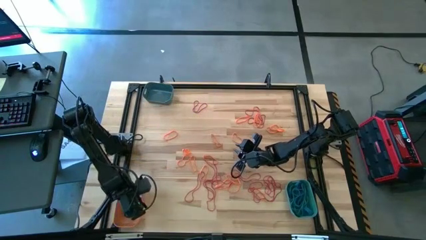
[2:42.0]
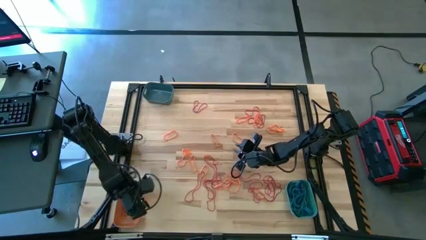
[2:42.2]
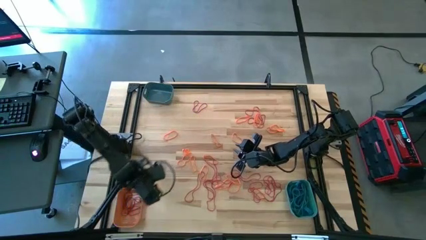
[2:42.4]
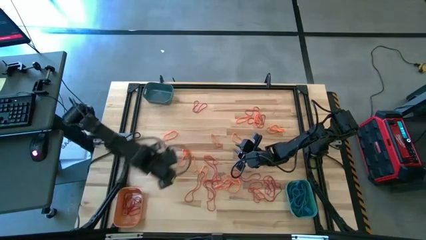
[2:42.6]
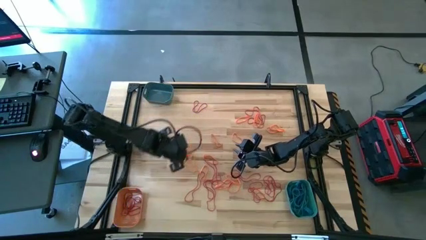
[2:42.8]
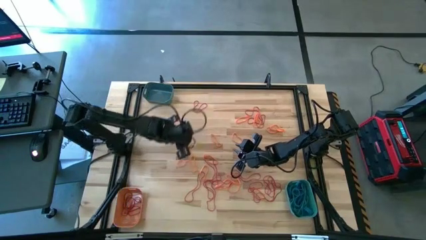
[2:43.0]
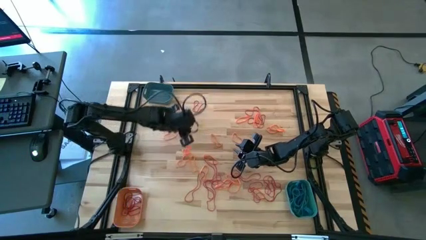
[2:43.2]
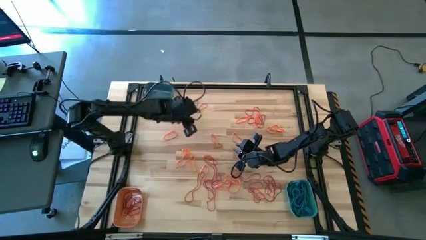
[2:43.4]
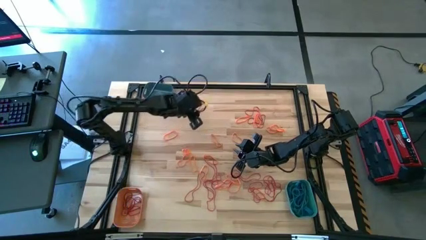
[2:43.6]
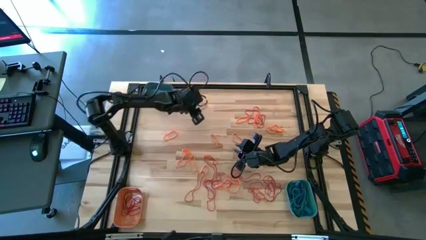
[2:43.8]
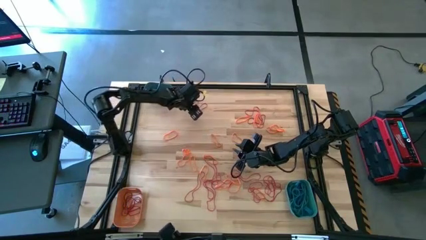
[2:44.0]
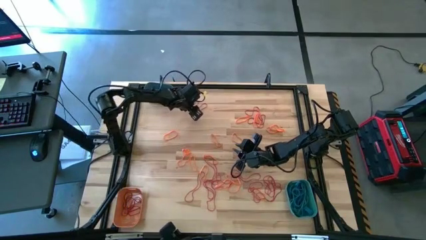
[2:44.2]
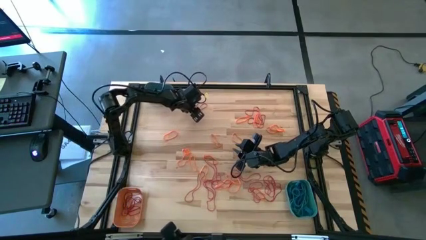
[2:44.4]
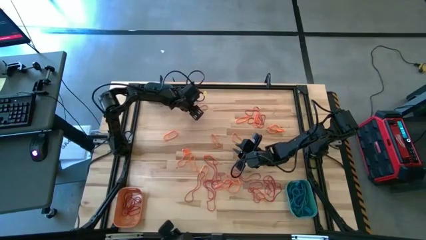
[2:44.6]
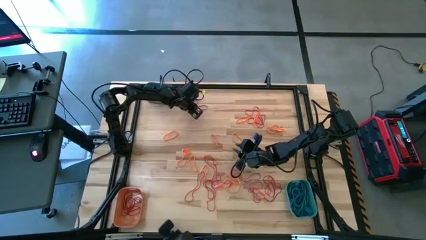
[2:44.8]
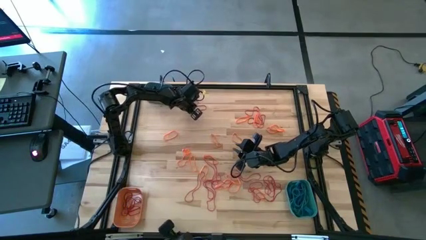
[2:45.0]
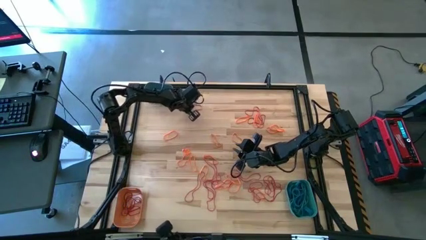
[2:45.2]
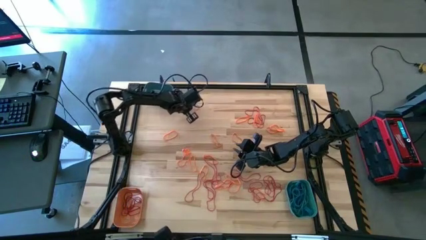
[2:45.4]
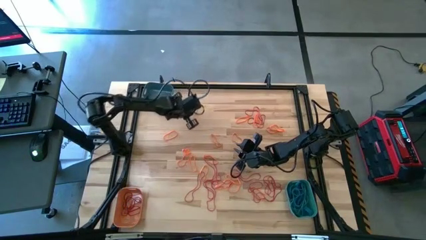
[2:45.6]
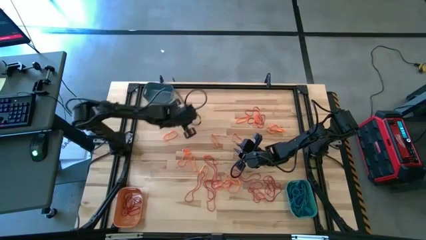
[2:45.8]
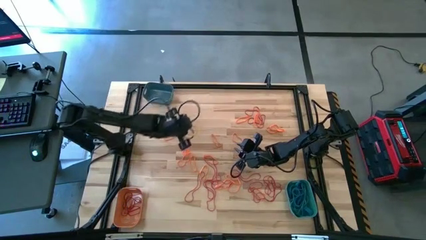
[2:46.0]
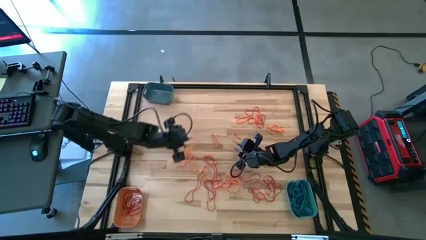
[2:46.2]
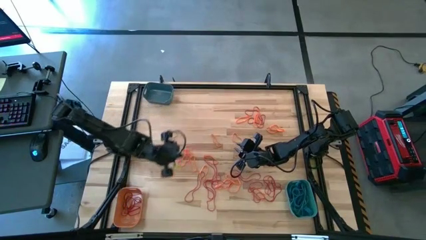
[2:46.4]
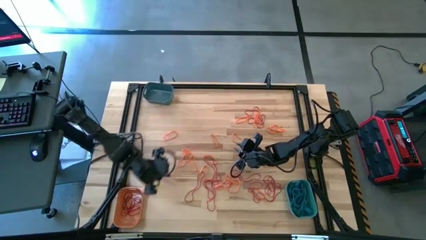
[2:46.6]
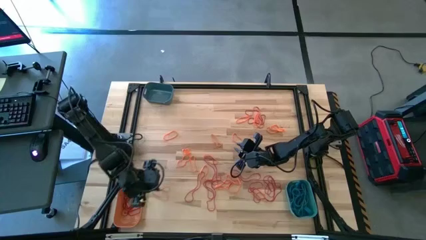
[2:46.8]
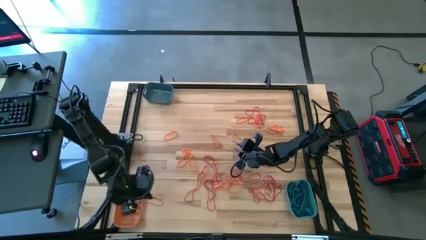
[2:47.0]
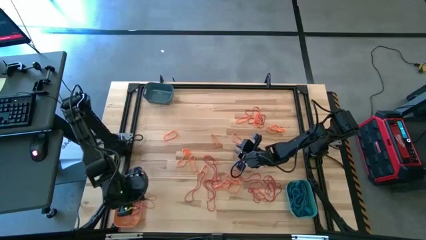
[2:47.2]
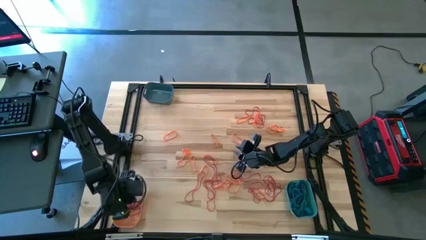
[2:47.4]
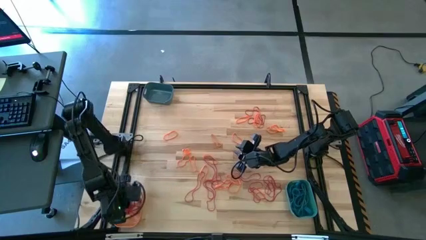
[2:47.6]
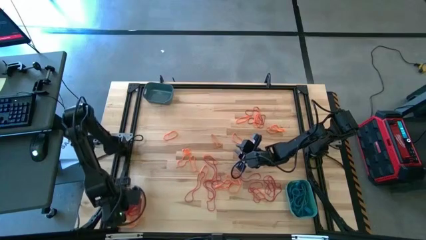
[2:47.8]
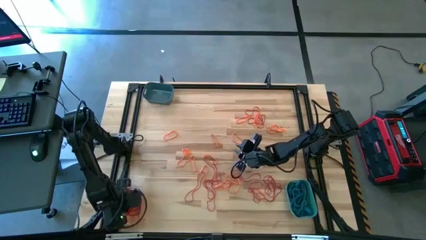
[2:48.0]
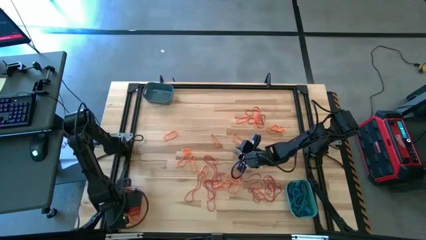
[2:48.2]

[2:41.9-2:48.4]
Task: Sort rubber bands into baskets
Put the red rubber band into the orange bin

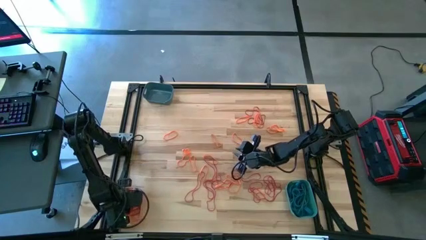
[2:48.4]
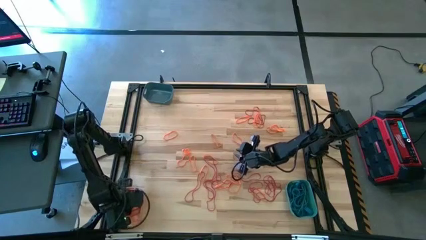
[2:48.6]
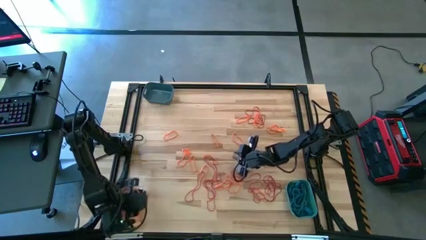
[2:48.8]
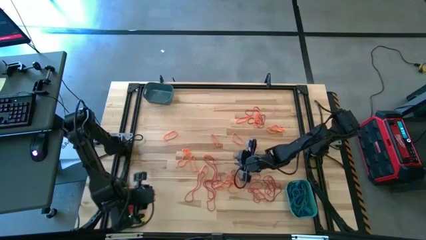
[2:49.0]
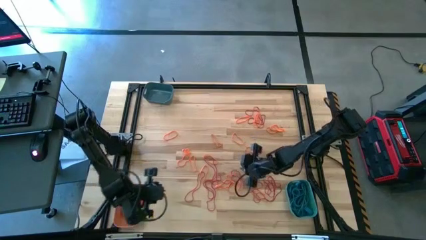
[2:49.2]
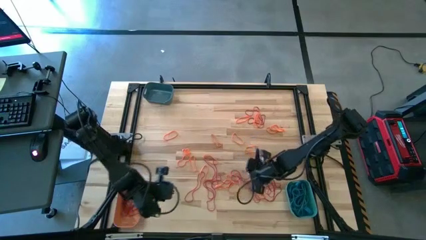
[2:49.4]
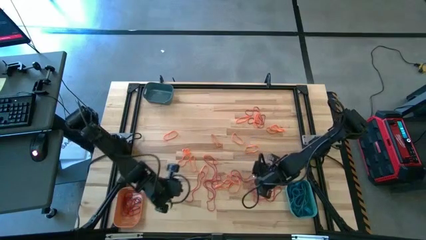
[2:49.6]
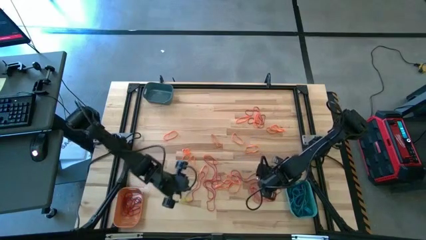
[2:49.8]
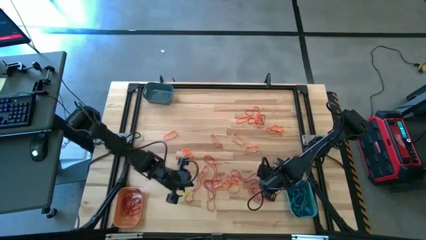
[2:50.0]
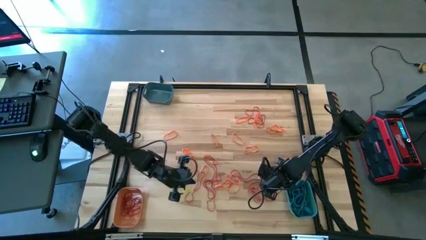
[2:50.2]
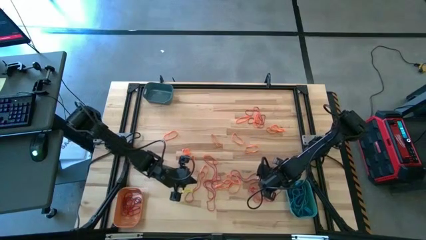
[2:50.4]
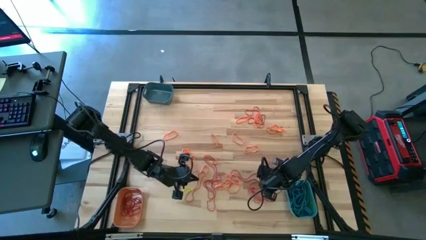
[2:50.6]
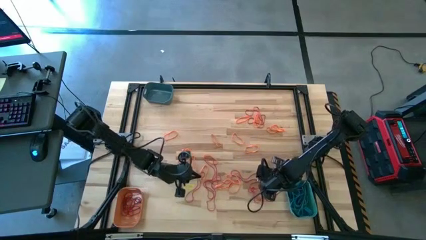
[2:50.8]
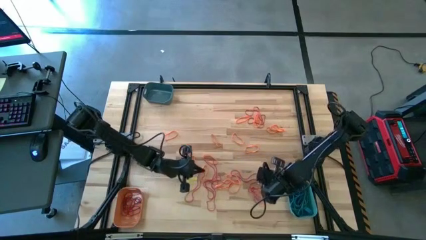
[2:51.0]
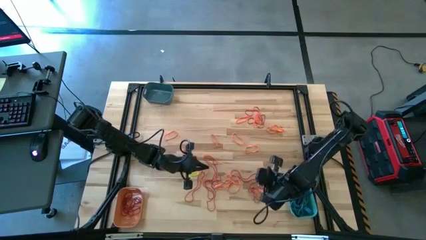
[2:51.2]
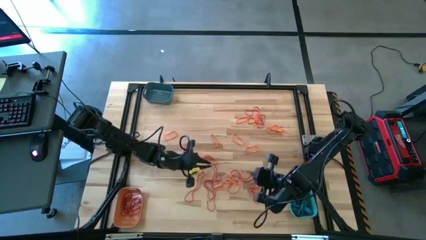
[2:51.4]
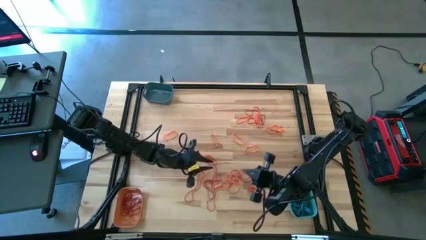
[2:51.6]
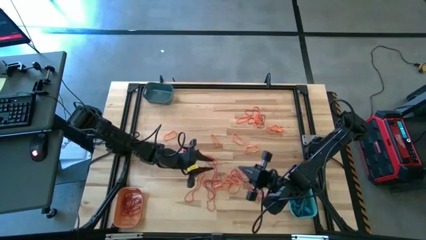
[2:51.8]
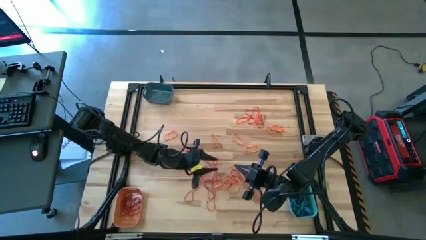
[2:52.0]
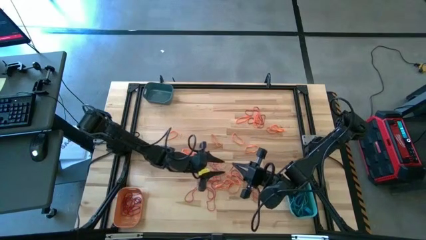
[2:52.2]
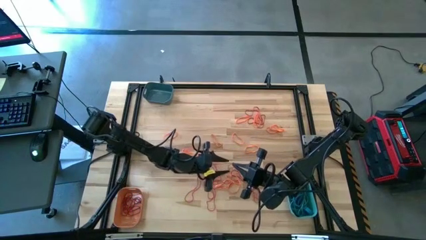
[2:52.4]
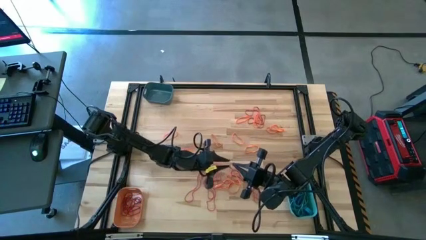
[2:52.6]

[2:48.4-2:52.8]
Put the red rubber band into the orange bin

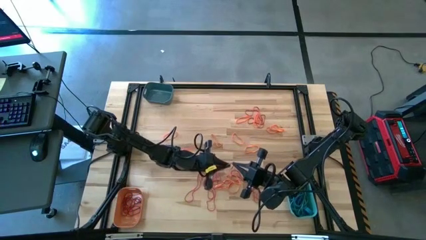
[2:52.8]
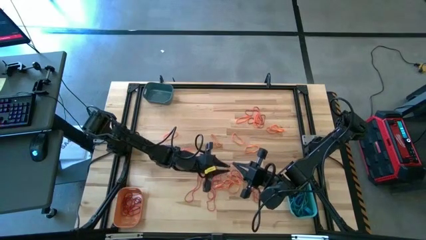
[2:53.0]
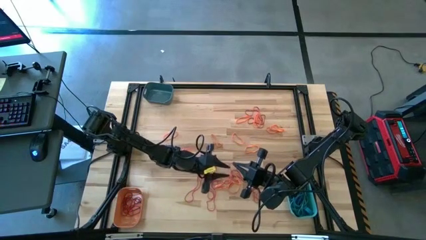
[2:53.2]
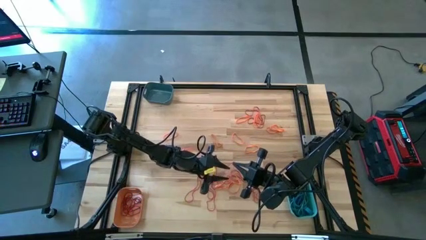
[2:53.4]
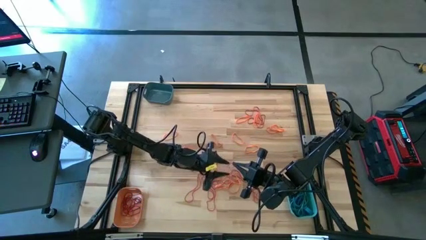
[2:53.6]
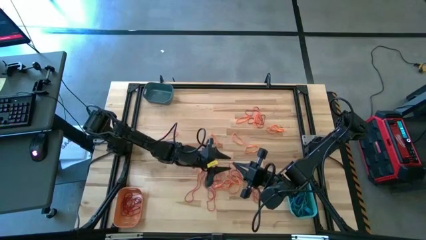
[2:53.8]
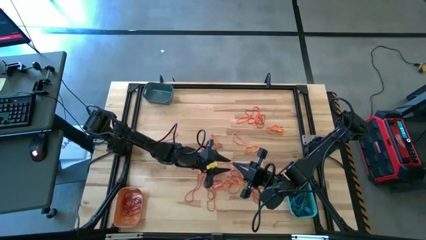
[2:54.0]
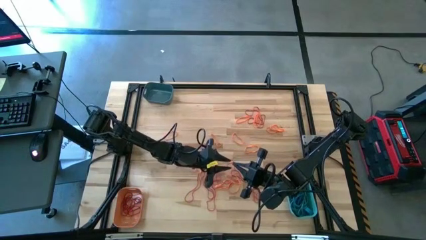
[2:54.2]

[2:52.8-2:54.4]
Put the red rubber band into the orange bin

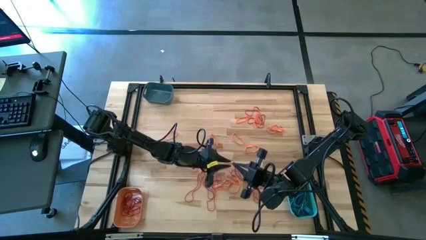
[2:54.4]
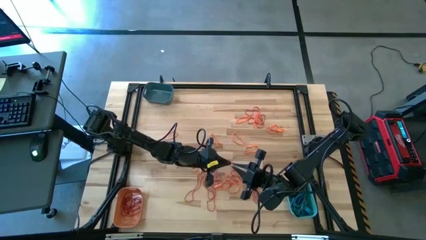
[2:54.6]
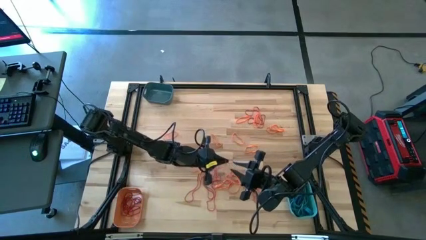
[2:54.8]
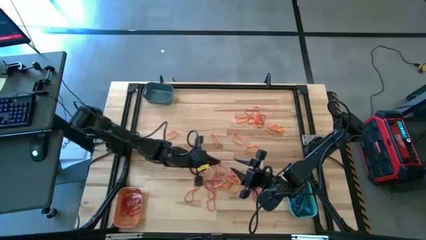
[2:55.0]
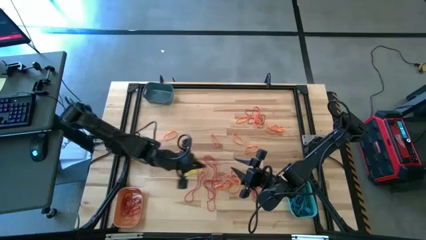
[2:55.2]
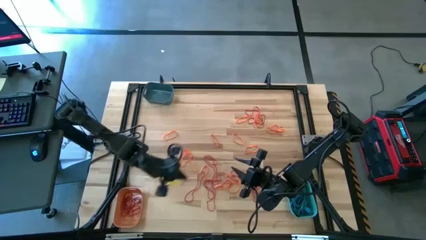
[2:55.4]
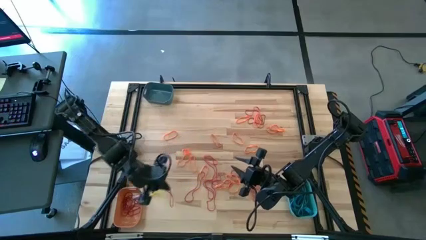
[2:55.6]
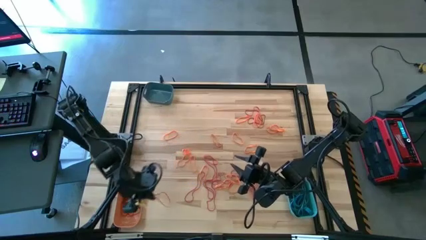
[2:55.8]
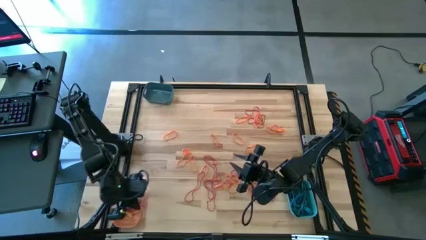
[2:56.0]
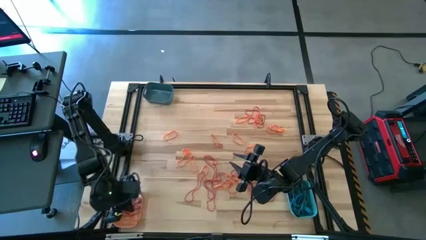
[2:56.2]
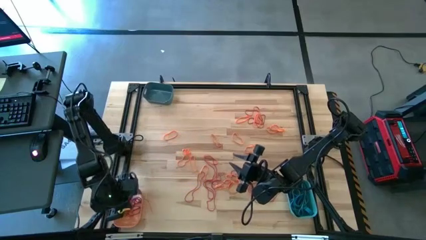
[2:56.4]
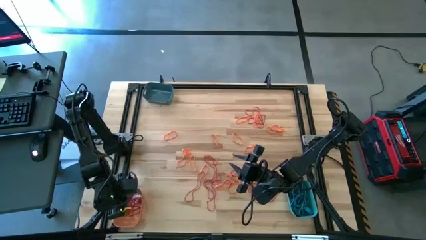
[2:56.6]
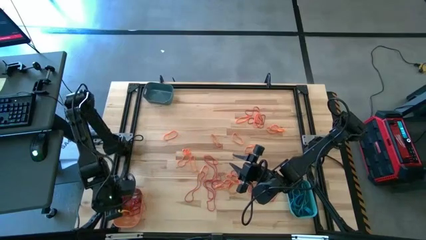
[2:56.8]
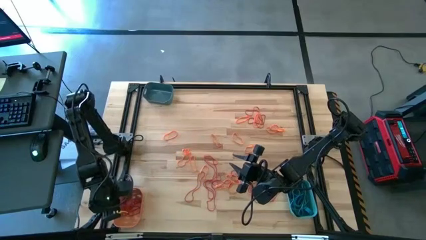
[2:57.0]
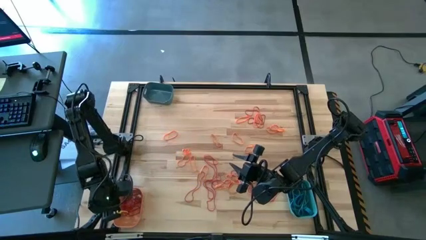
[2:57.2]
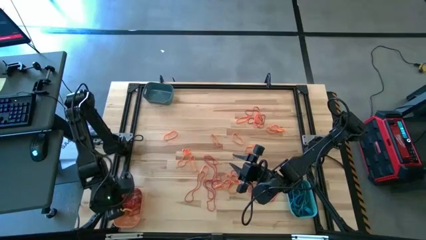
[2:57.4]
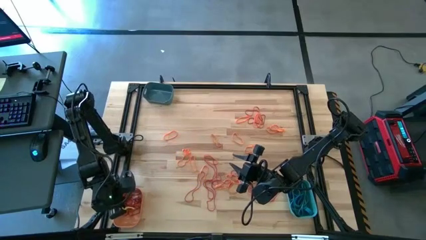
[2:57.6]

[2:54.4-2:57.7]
Put the red rubber band into the orange bin
